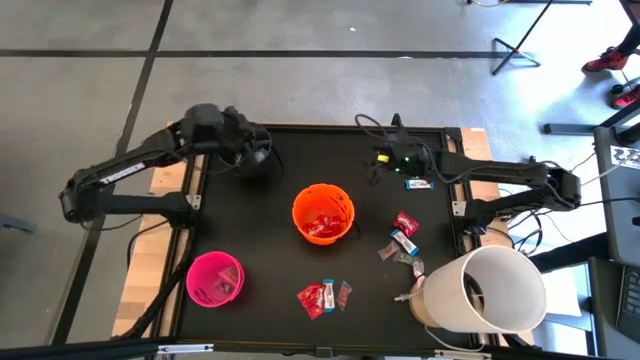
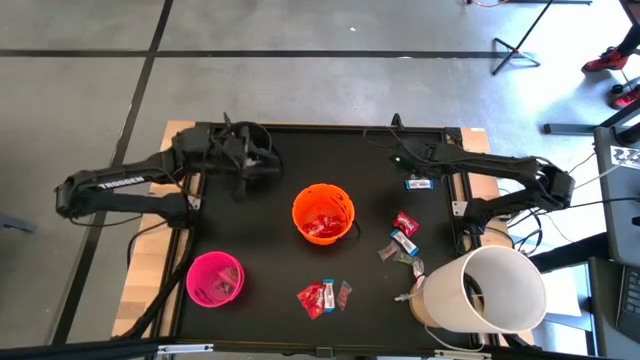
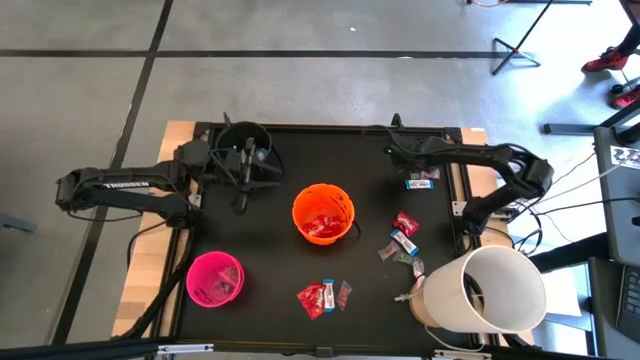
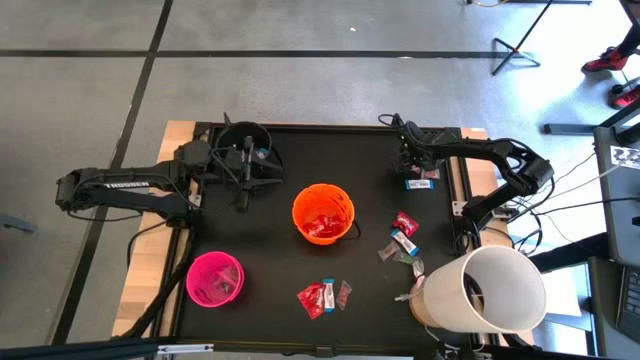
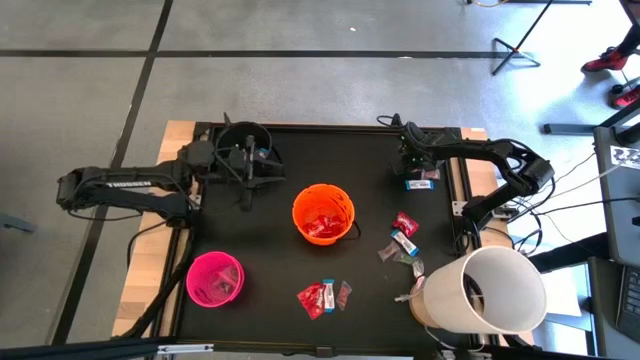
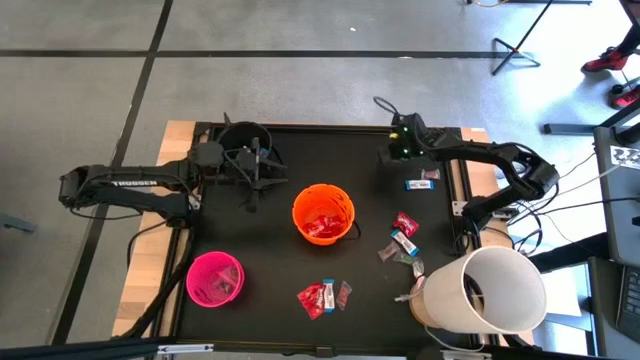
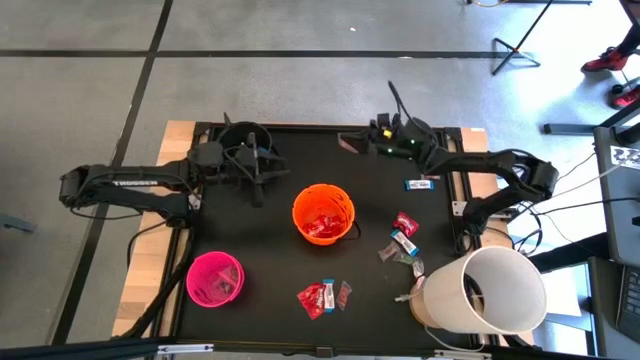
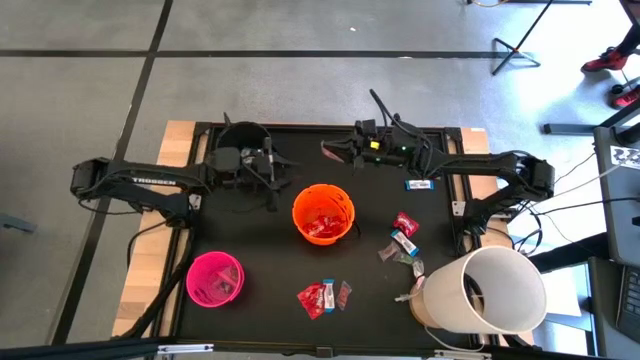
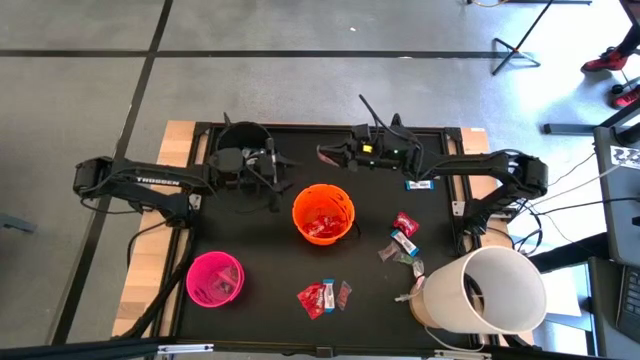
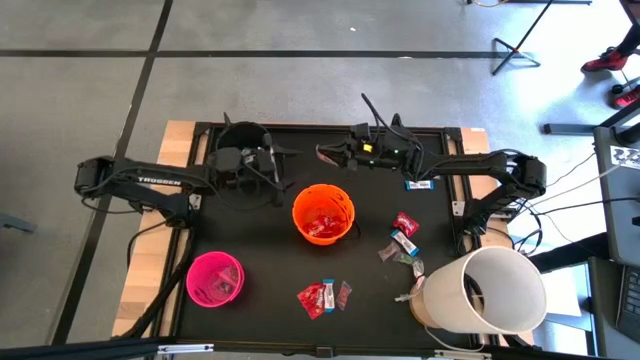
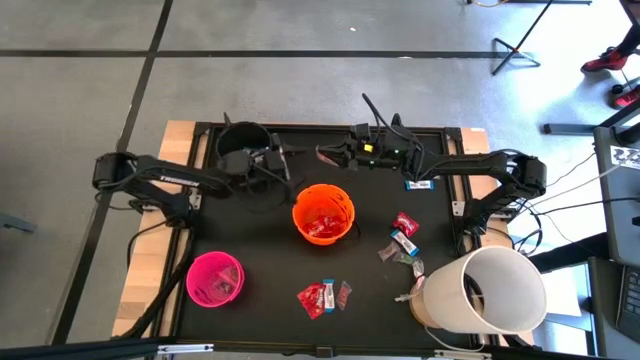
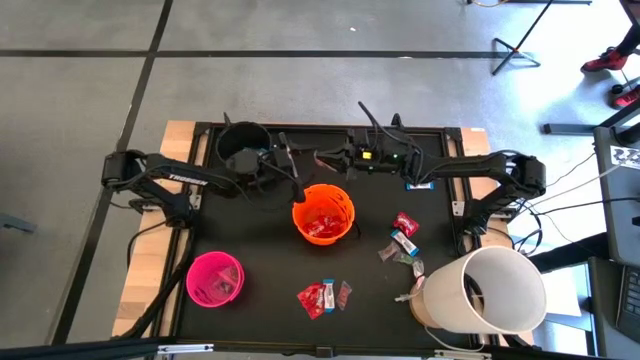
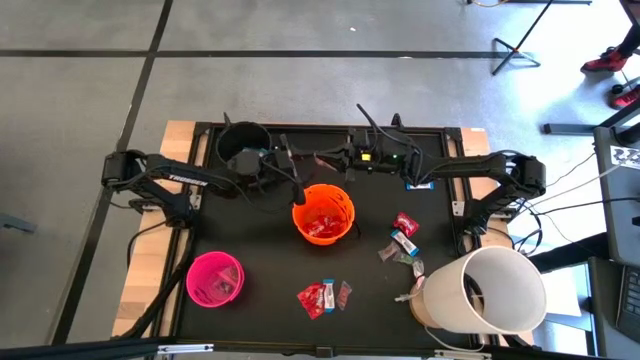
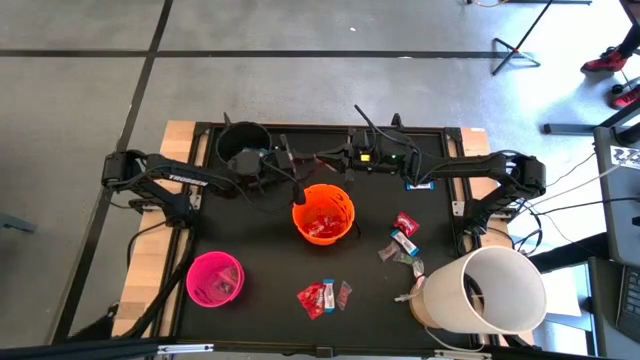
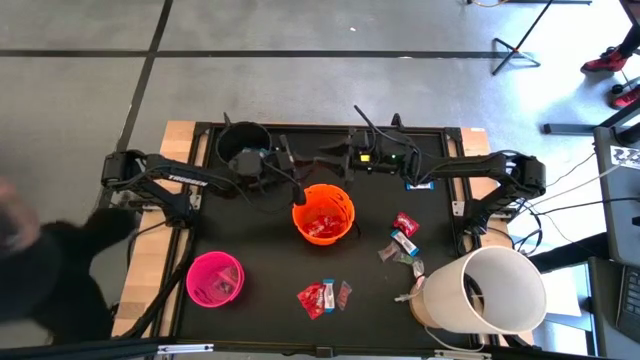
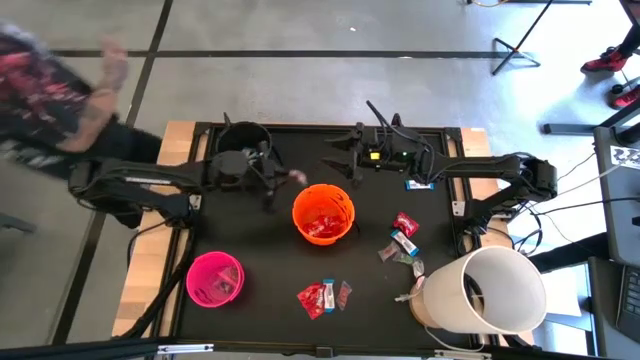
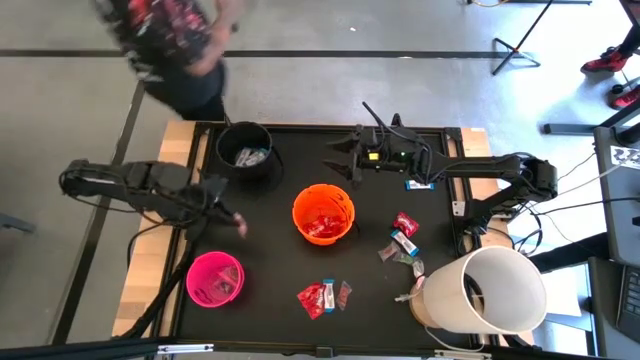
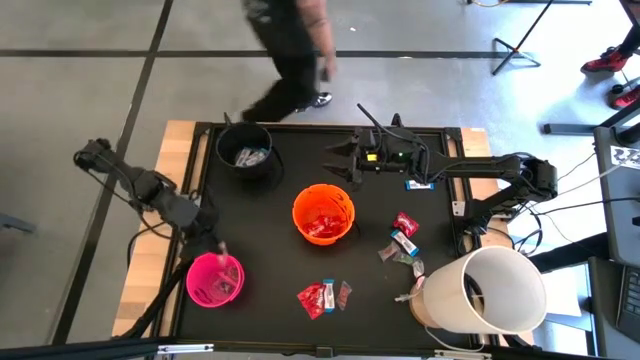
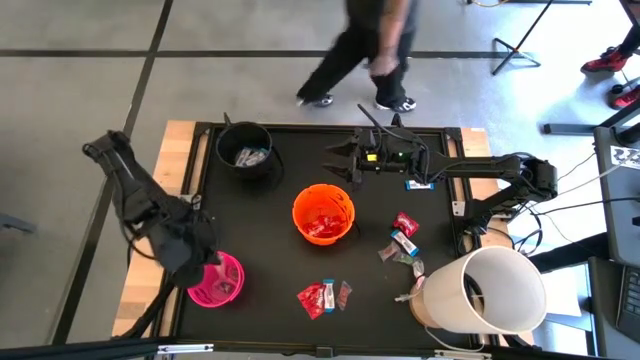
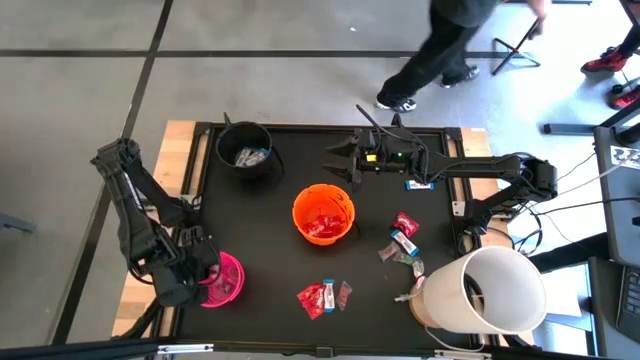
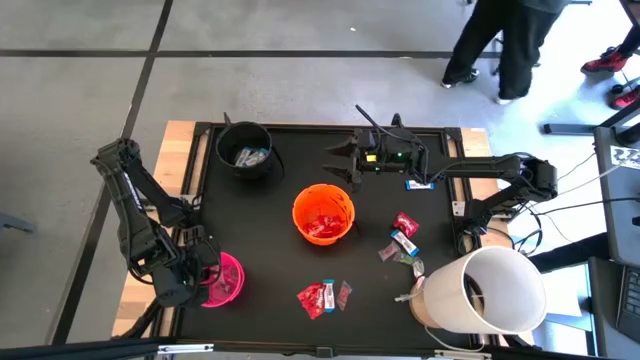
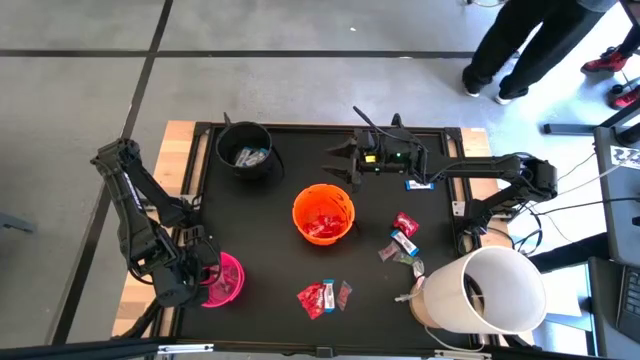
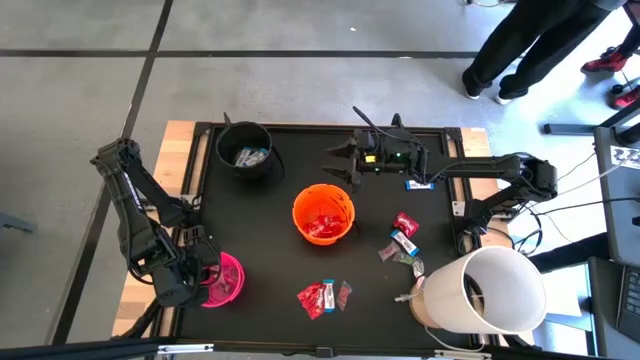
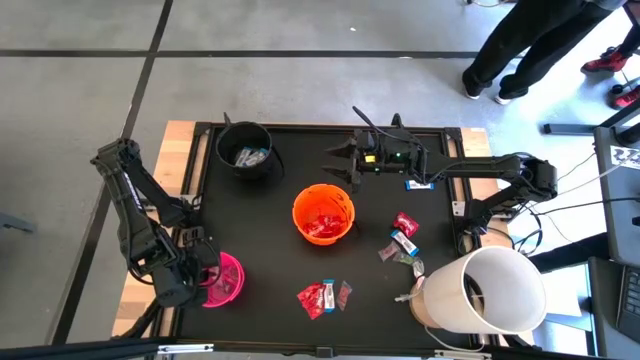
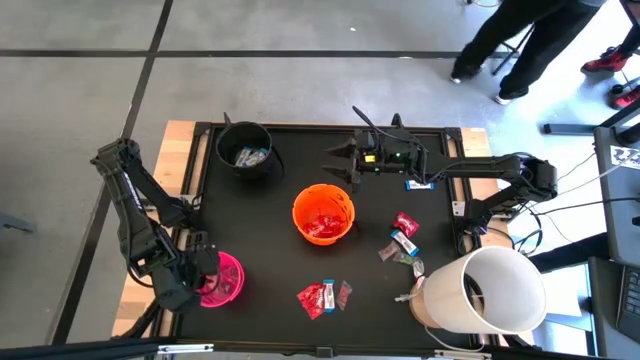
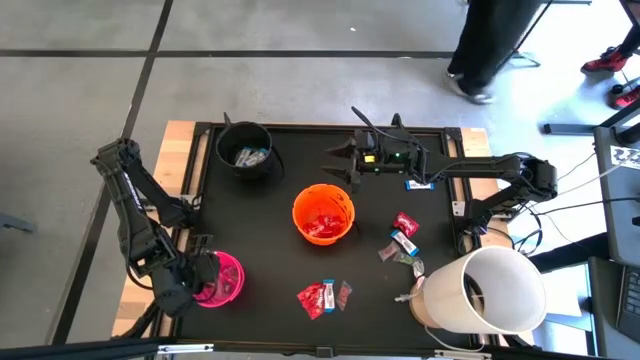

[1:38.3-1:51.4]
Task: Sort candy
Put the transparent candy into the pink bucket

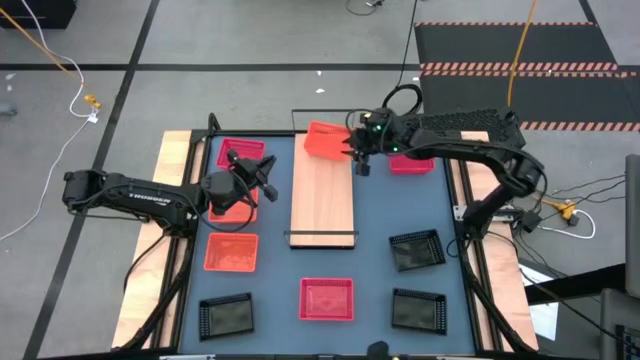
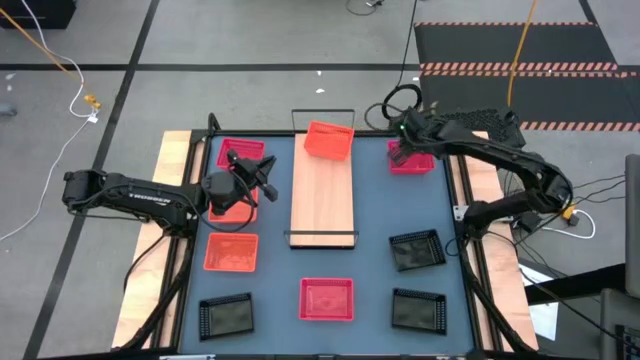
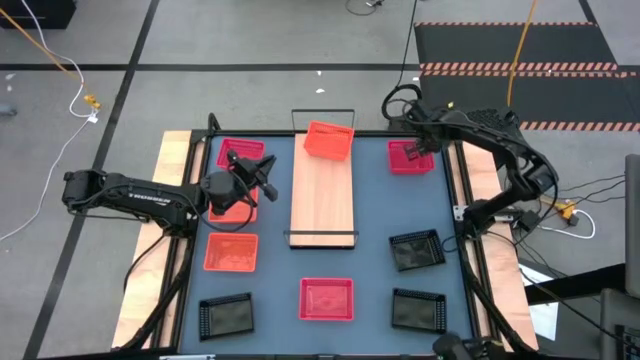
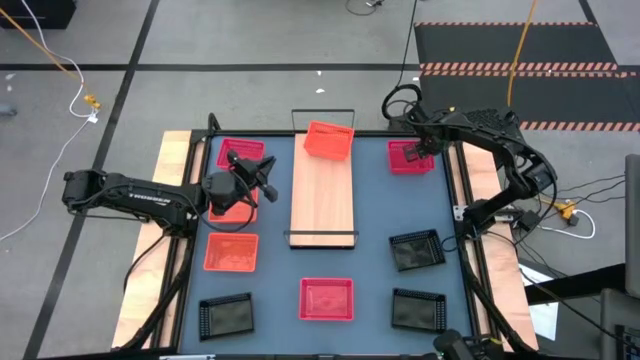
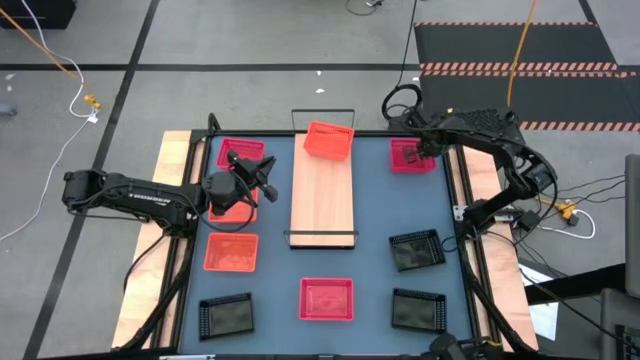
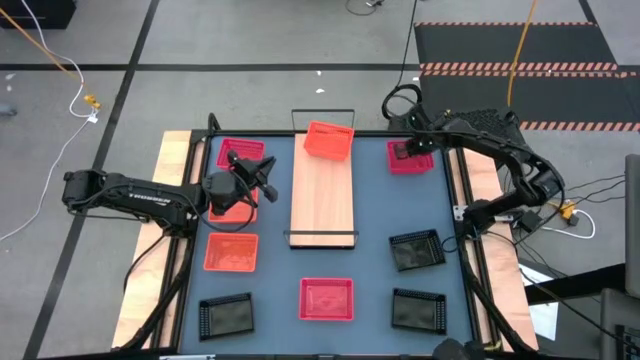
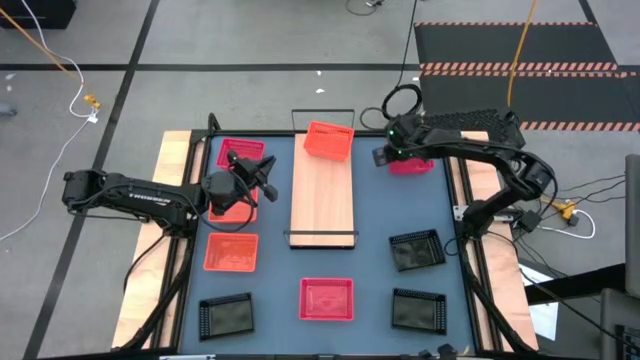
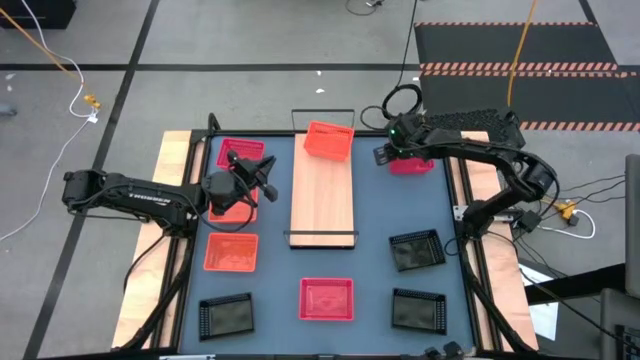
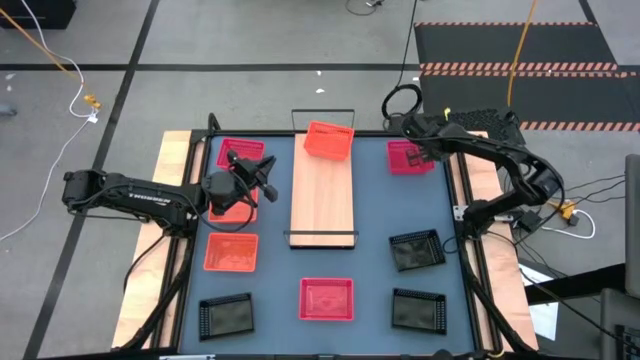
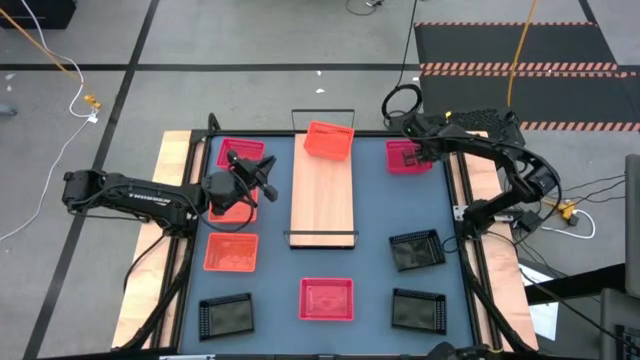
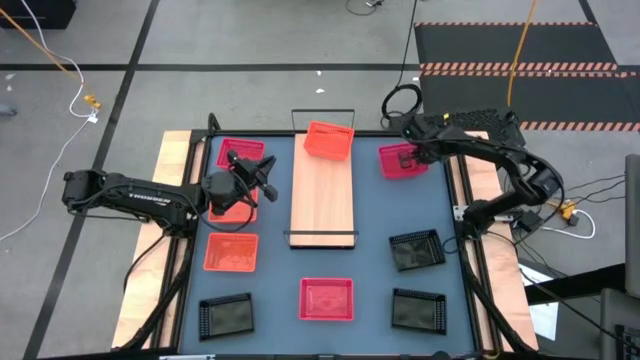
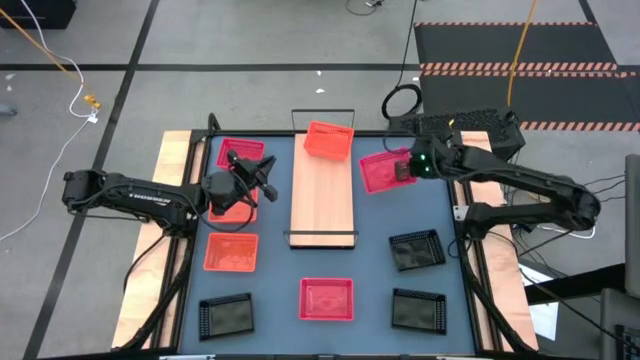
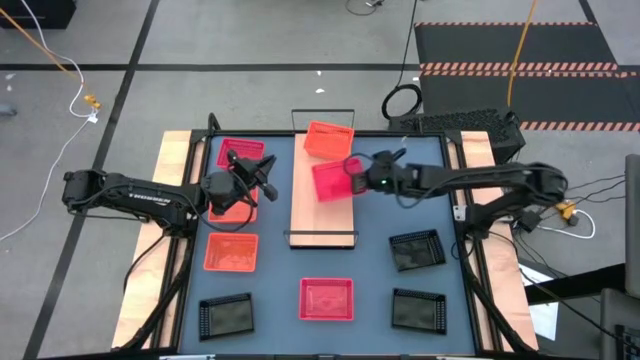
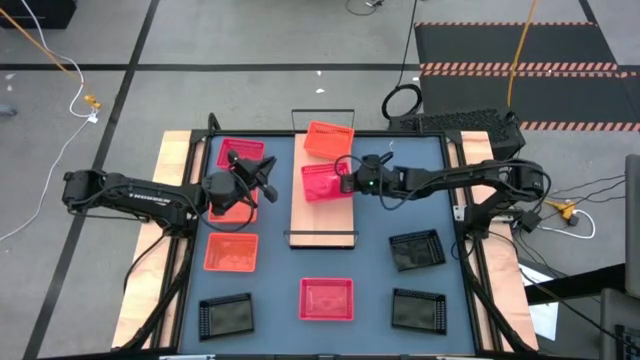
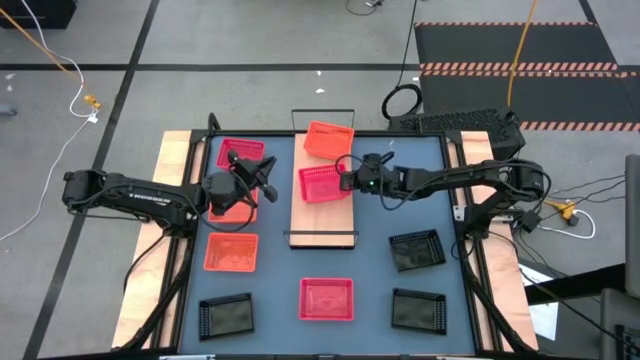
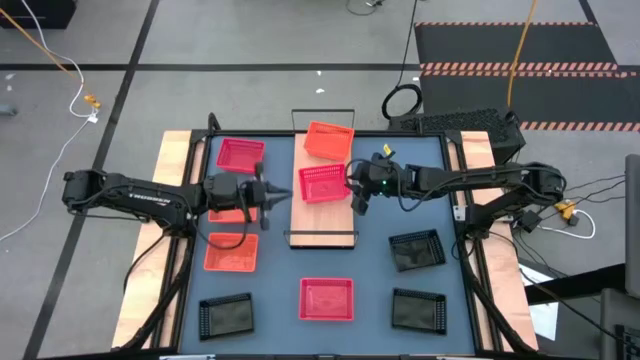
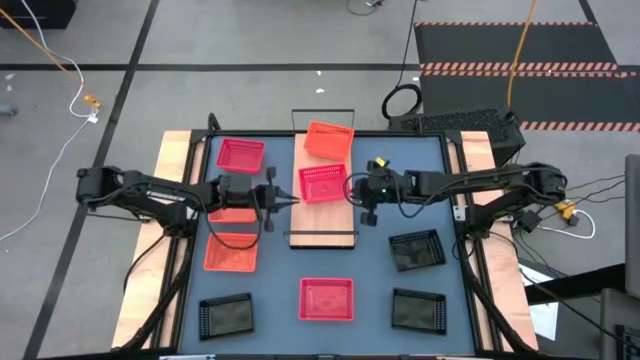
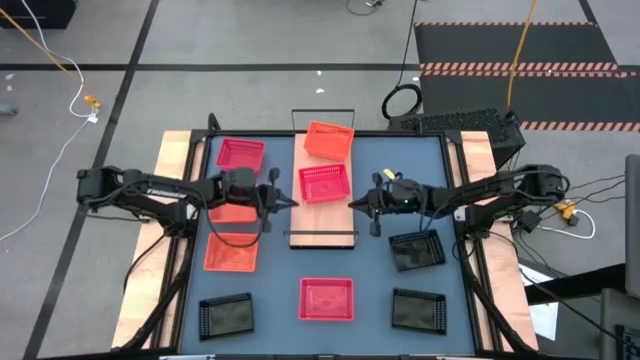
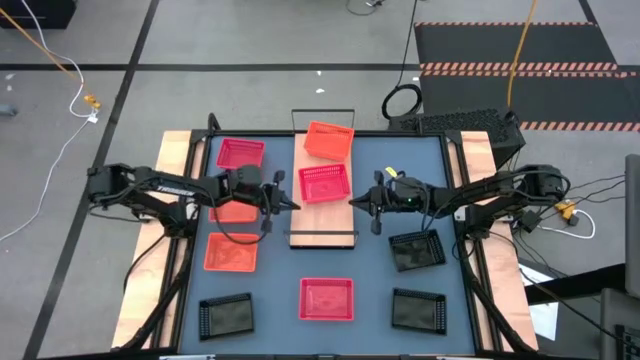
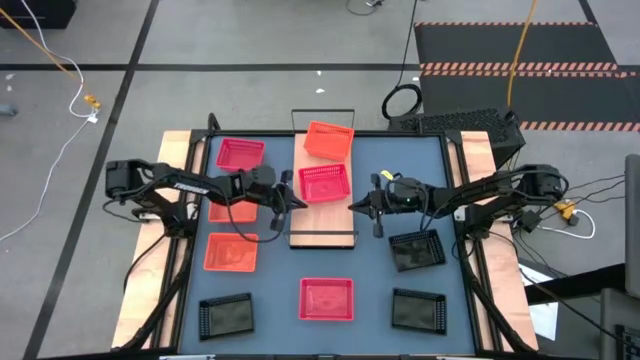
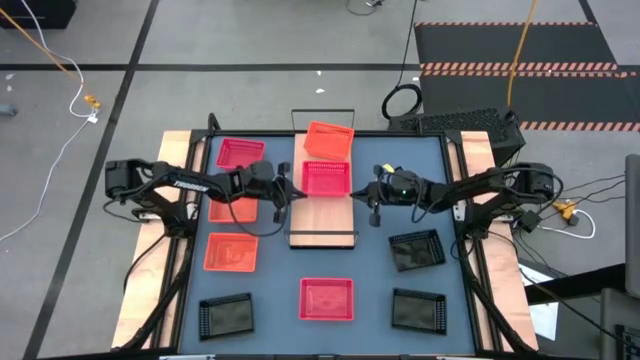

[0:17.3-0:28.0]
Task: Stack baskets on shelf by color
Put the top right red bin on the shelf
